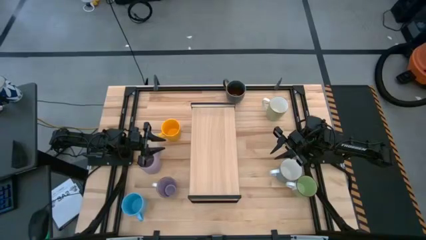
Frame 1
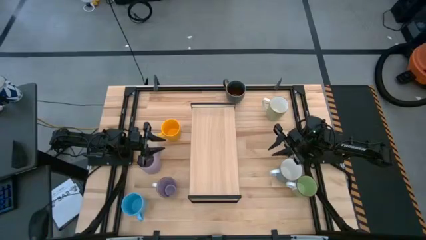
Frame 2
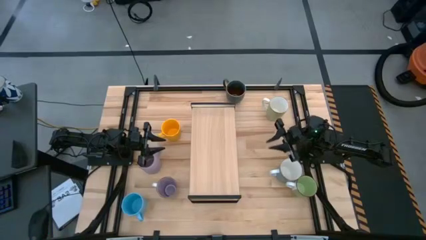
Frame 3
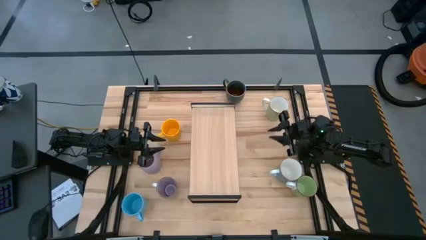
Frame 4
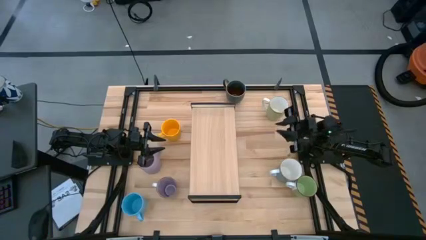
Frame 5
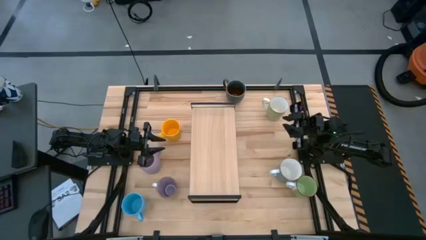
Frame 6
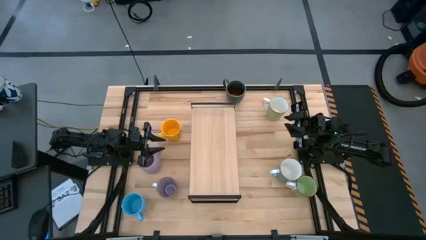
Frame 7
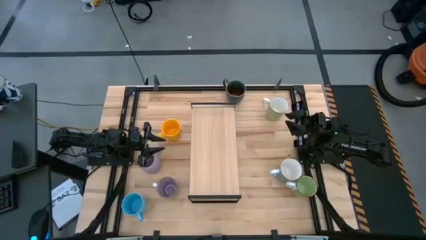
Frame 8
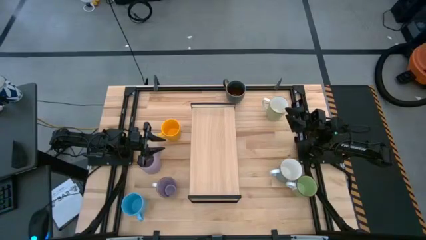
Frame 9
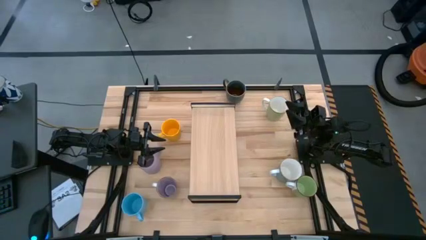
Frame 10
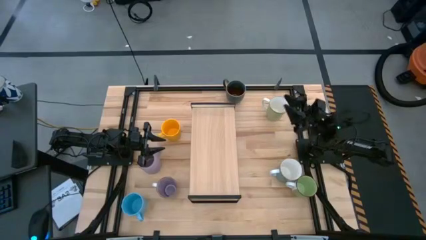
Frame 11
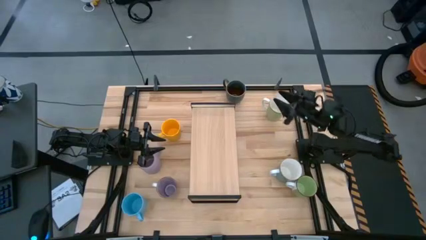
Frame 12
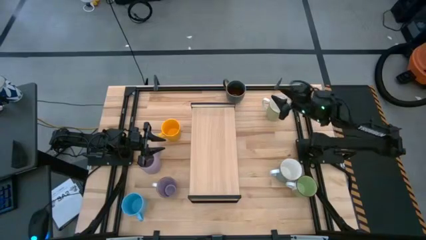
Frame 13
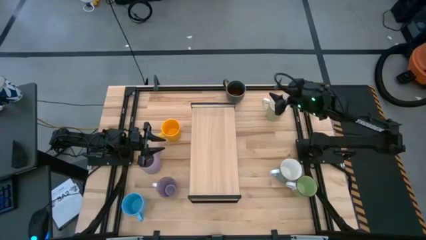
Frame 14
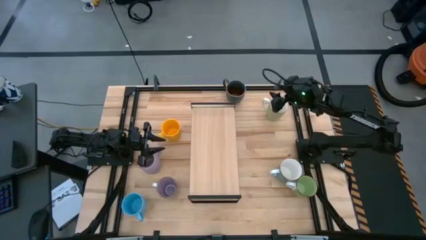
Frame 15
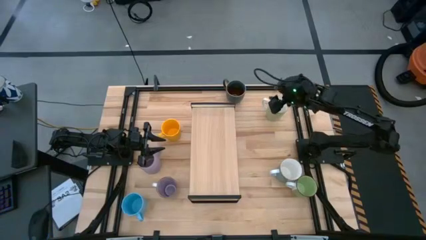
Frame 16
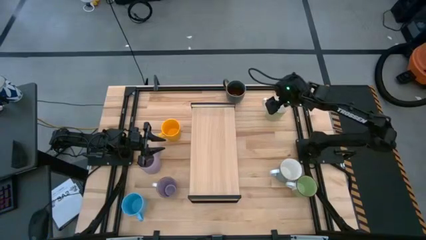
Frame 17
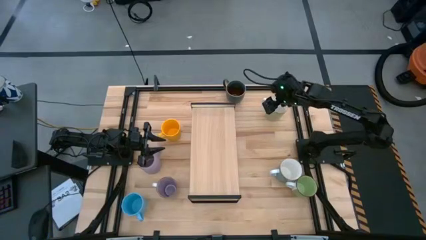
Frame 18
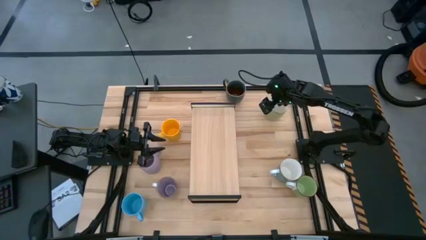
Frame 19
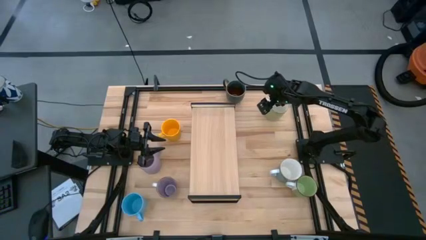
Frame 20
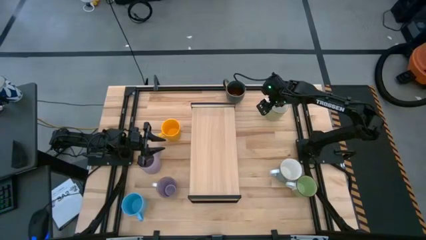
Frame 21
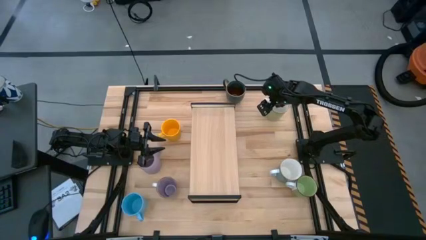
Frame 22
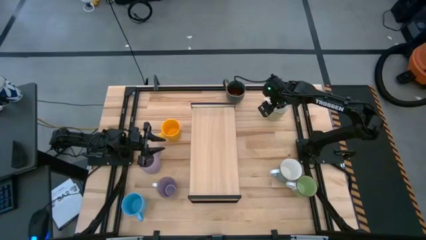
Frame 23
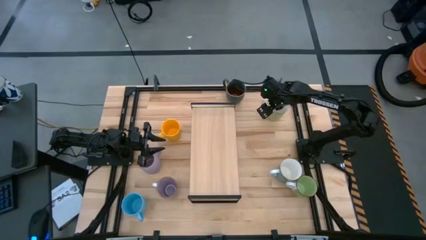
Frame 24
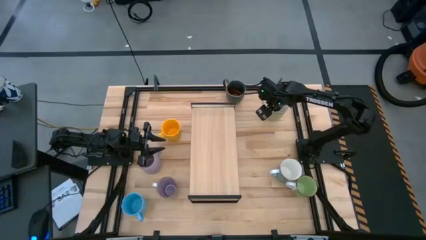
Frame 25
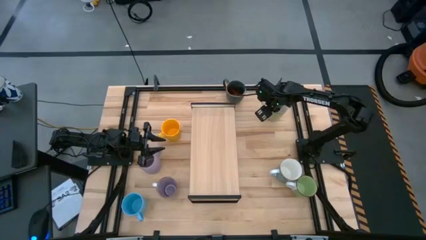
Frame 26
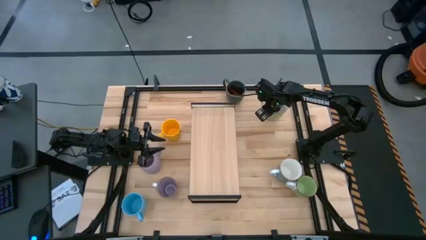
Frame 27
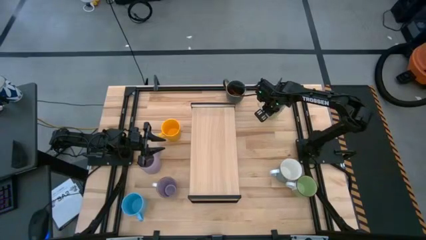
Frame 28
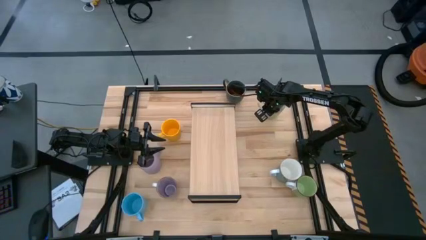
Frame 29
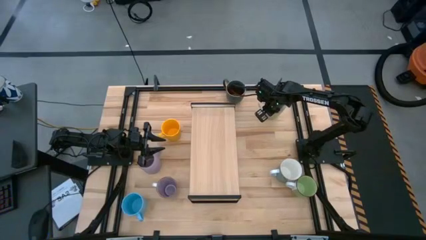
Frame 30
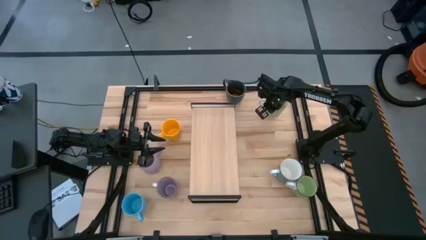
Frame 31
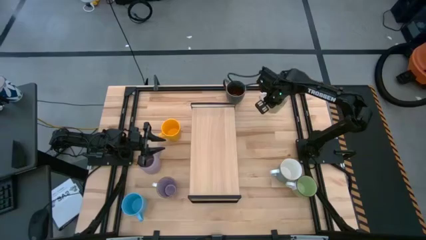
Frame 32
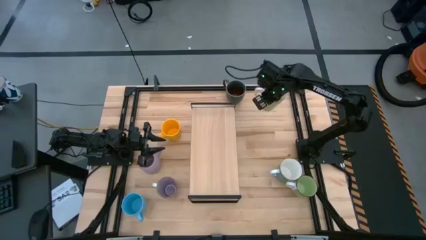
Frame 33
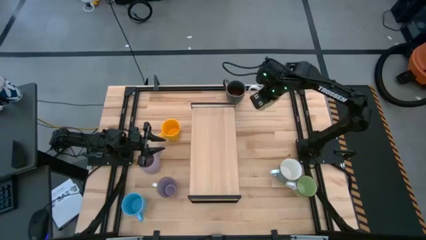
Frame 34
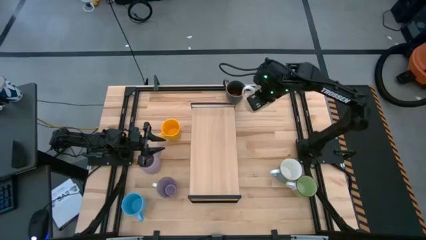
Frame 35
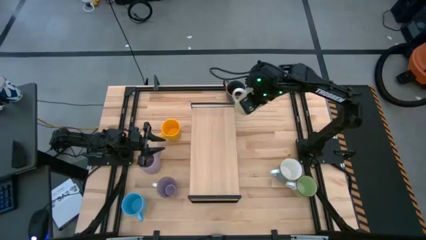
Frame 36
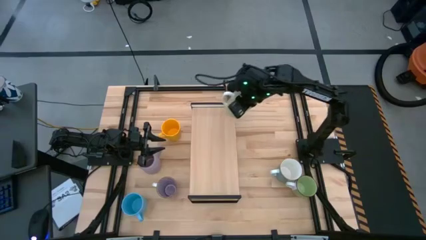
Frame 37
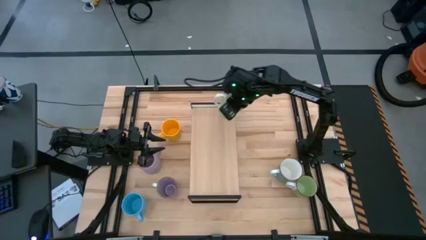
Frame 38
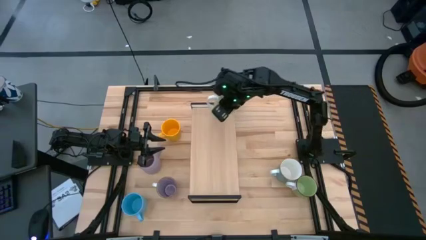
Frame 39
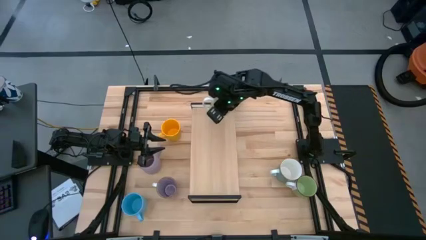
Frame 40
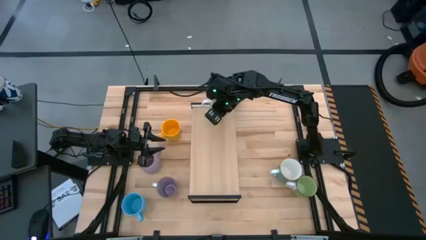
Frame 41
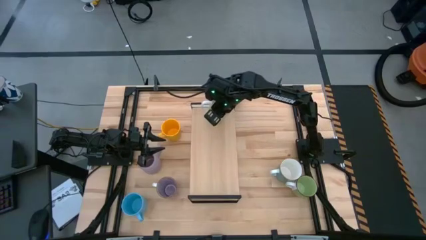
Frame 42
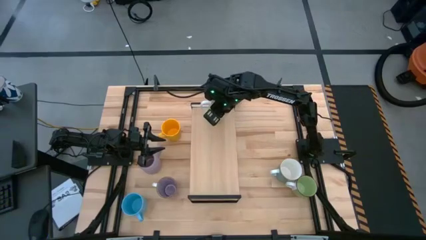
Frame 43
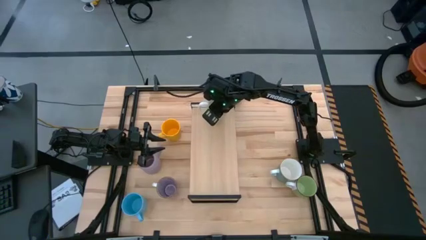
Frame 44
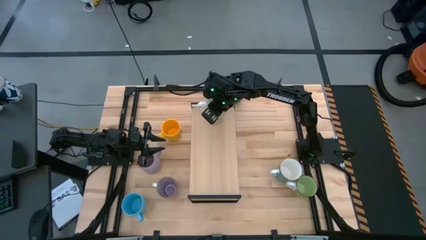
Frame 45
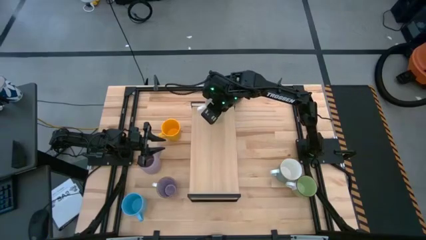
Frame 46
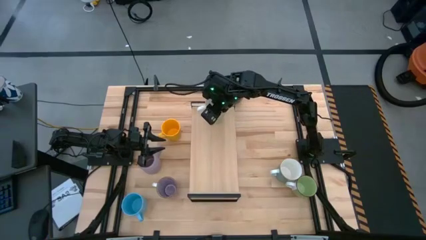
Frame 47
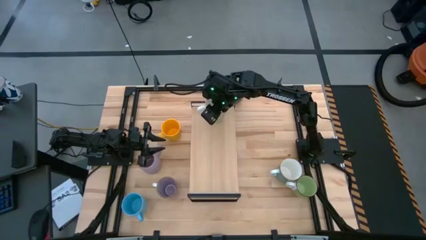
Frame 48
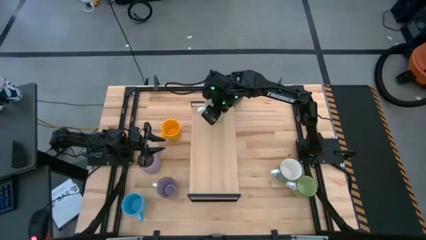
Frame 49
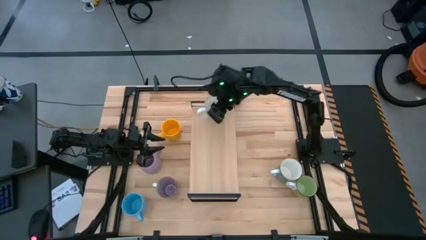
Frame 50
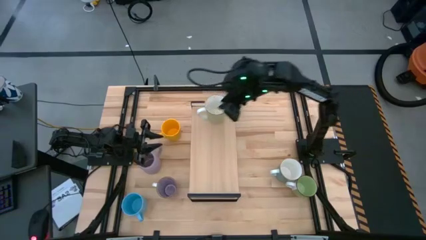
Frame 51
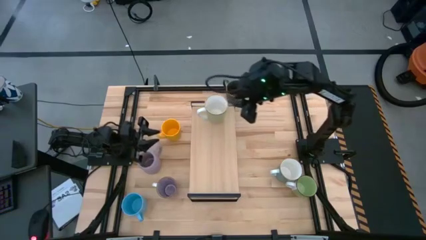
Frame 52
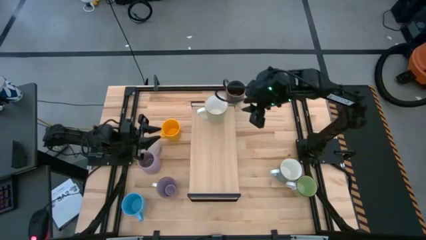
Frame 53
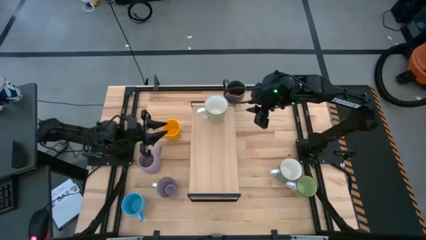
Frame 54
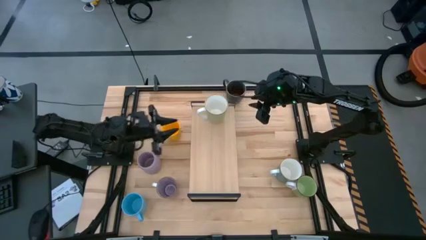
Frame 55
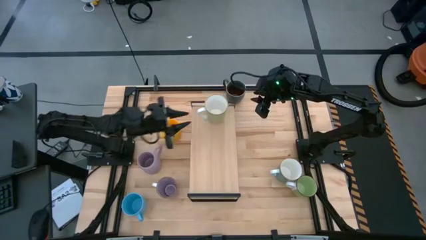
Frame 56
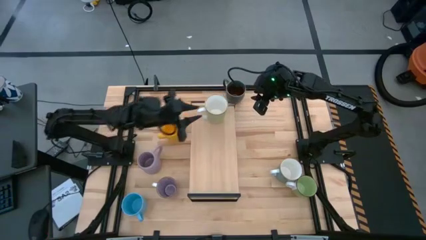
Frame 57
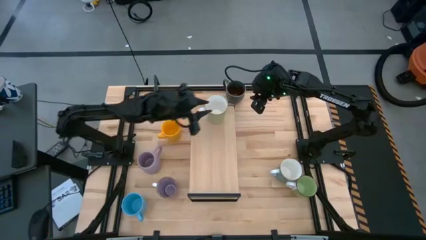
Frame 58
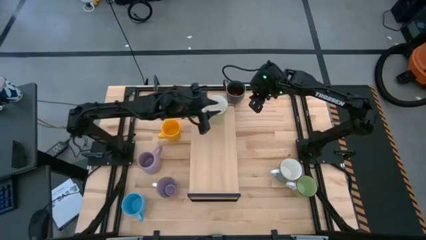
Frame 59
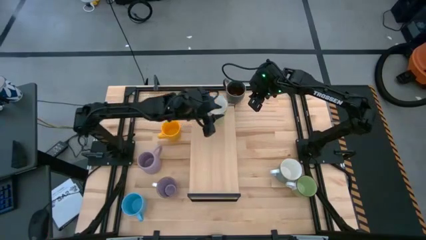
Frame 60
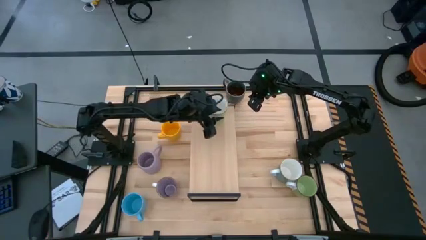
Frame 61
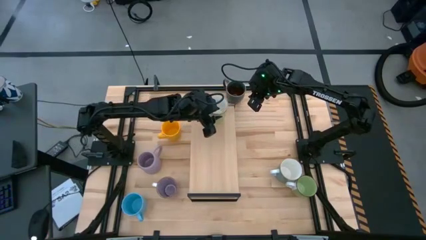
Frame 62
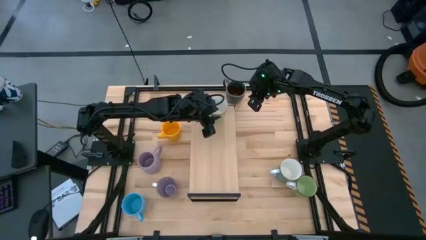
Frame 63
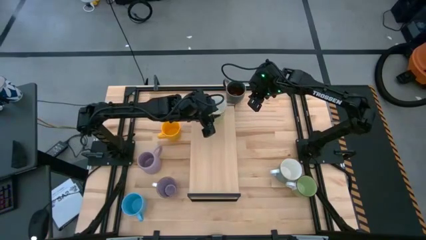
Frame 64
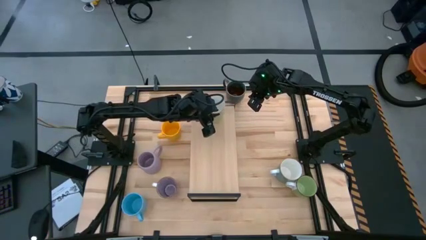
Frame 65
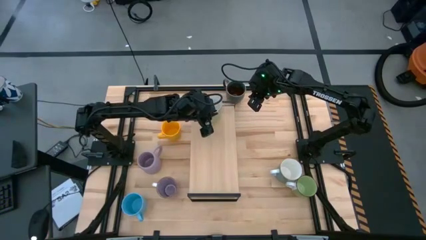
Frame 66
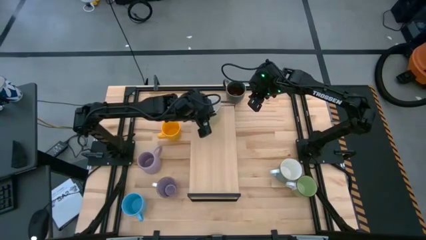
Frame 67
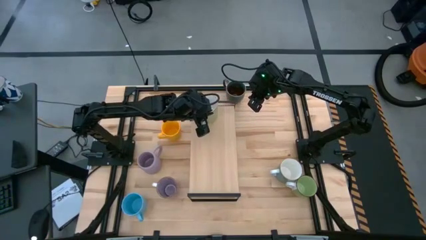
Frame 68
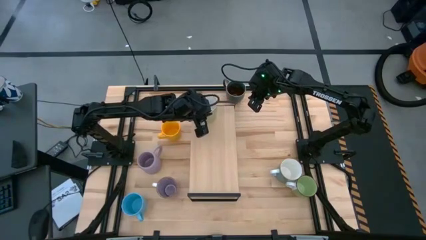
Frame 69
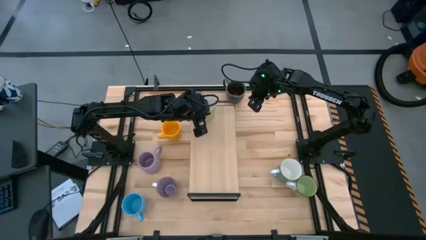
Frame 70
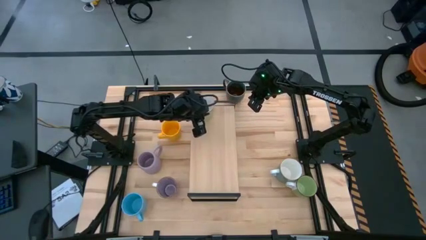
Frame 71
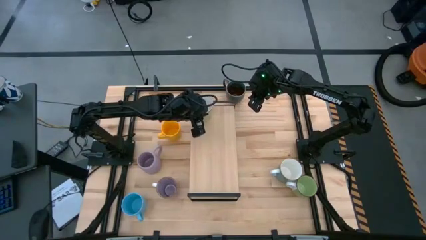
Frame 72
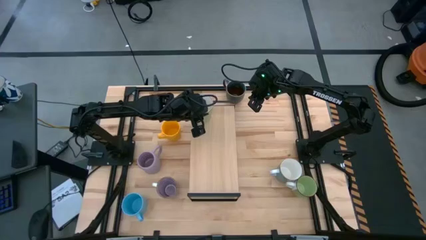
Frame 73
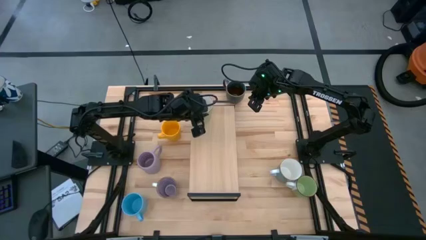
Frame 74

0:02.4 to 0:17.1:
Task: Place coffee mugs
Put the top light green mug on the shelf
